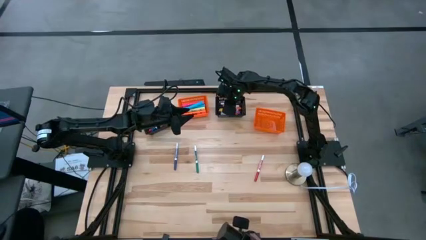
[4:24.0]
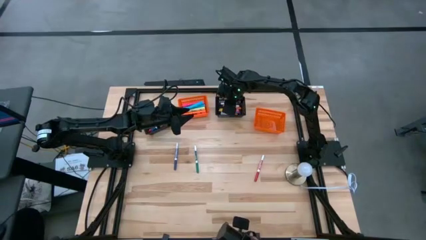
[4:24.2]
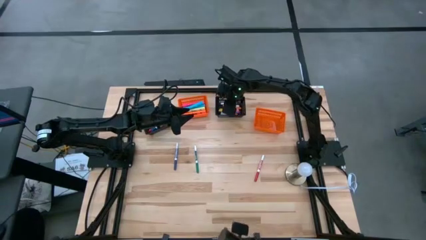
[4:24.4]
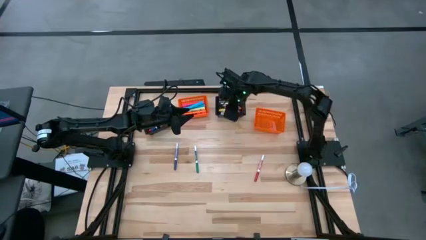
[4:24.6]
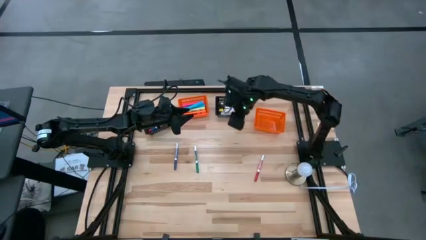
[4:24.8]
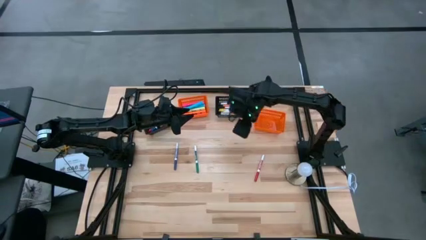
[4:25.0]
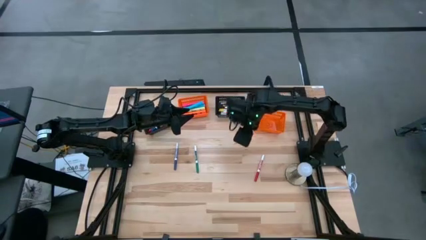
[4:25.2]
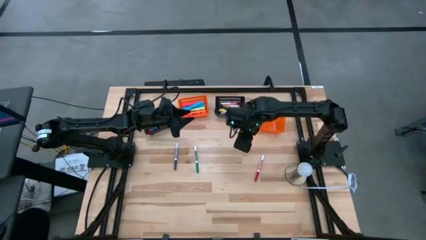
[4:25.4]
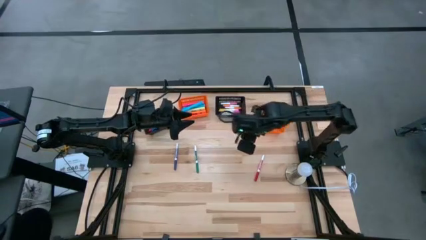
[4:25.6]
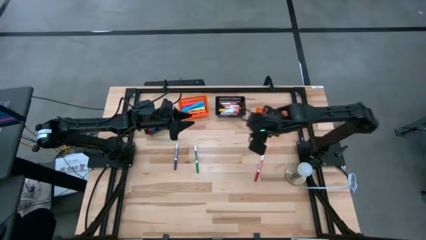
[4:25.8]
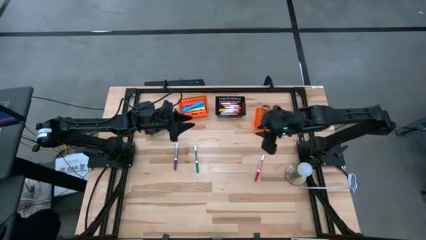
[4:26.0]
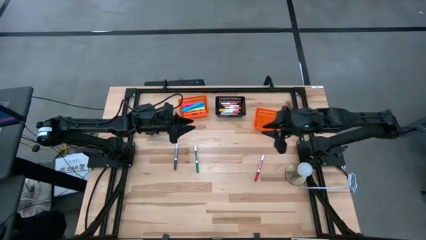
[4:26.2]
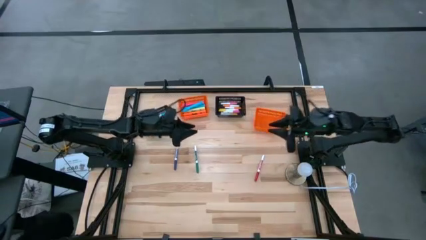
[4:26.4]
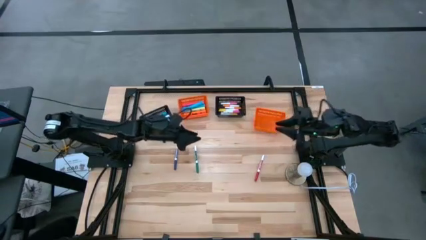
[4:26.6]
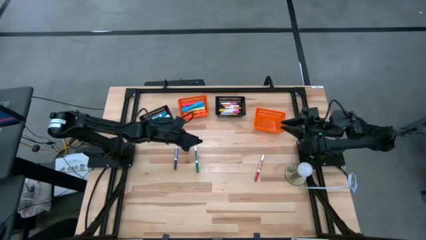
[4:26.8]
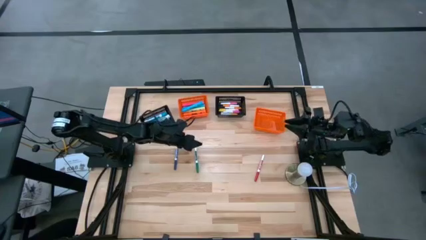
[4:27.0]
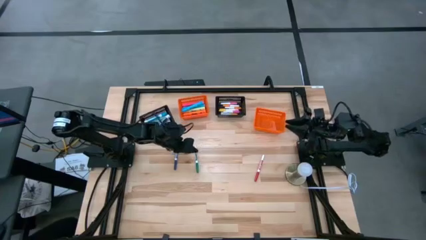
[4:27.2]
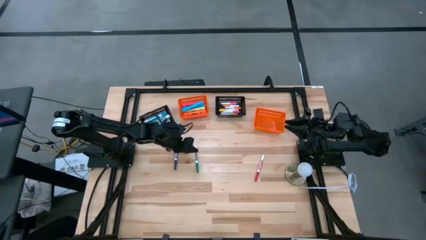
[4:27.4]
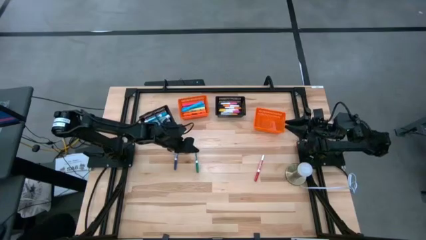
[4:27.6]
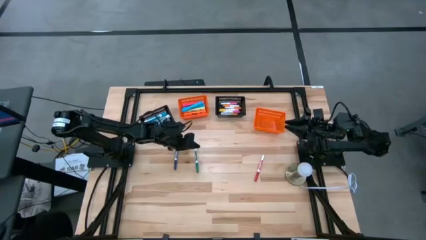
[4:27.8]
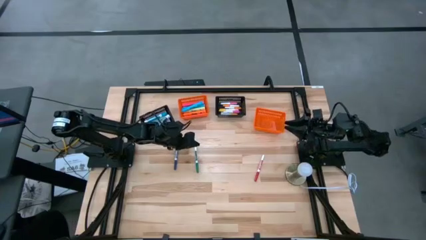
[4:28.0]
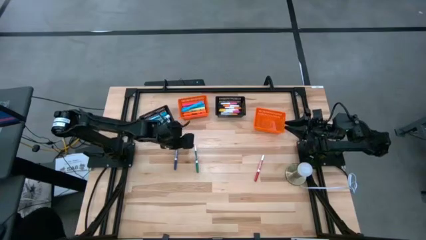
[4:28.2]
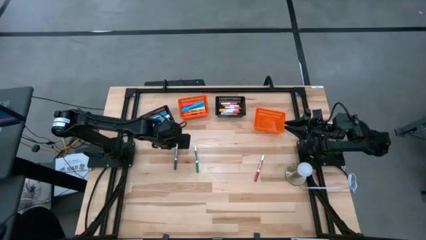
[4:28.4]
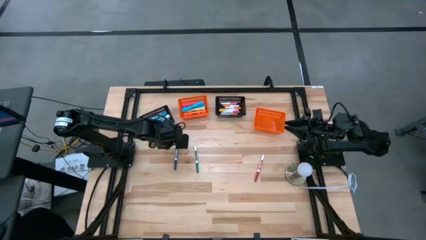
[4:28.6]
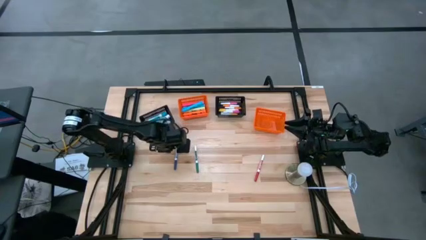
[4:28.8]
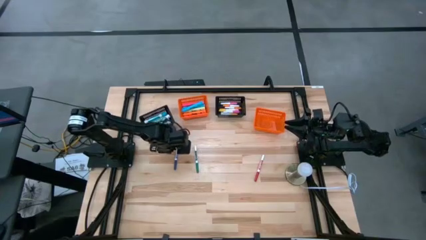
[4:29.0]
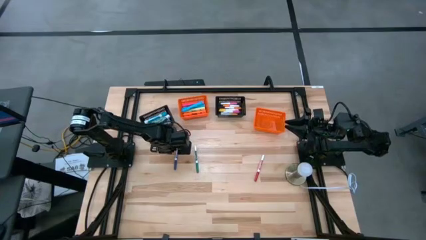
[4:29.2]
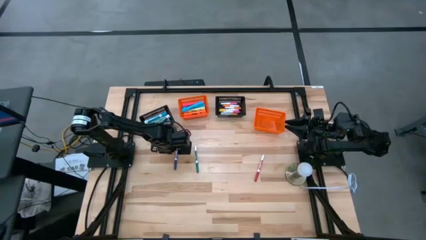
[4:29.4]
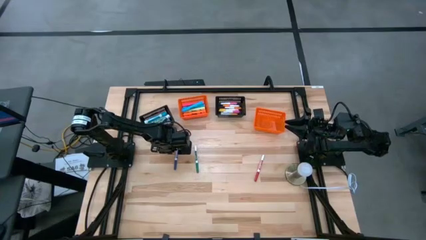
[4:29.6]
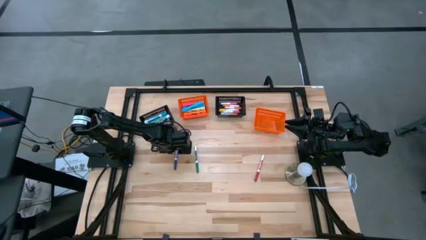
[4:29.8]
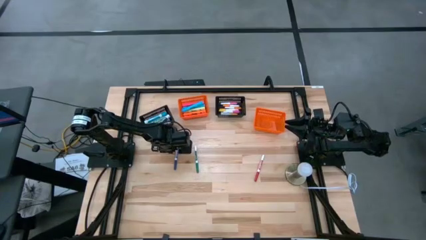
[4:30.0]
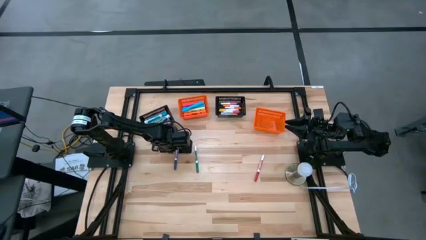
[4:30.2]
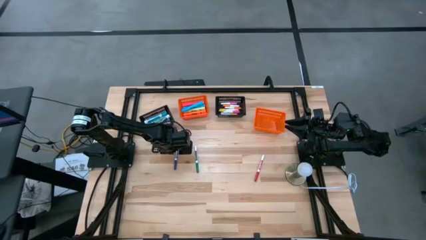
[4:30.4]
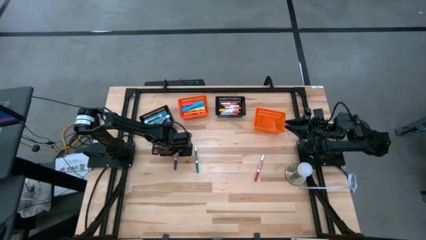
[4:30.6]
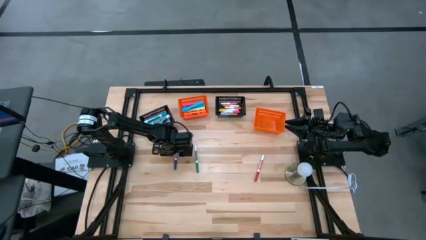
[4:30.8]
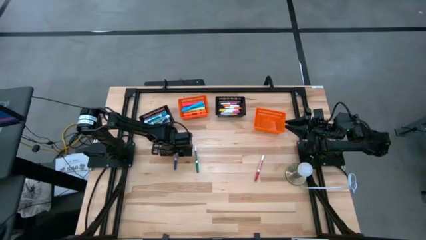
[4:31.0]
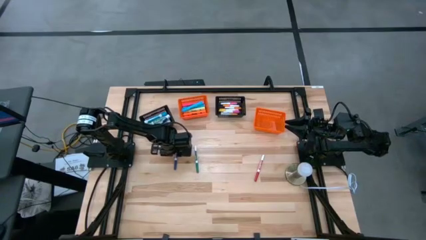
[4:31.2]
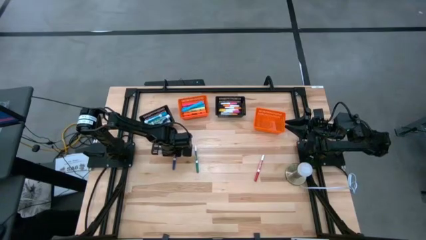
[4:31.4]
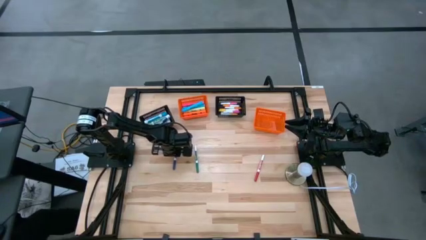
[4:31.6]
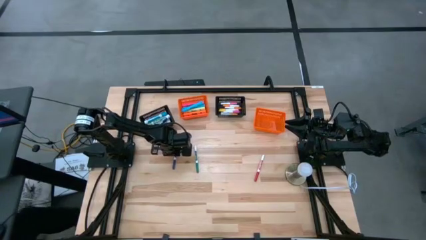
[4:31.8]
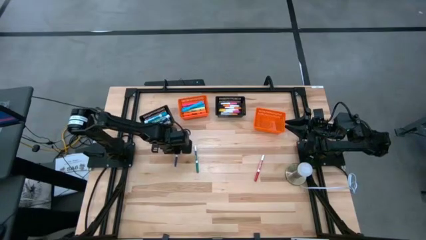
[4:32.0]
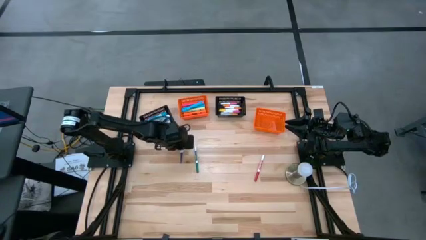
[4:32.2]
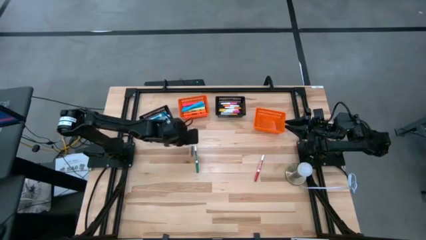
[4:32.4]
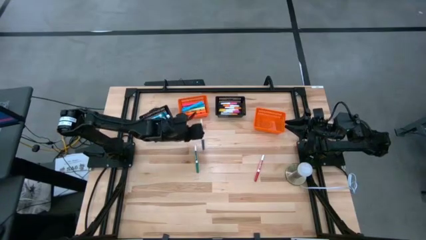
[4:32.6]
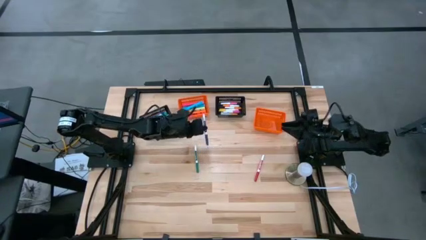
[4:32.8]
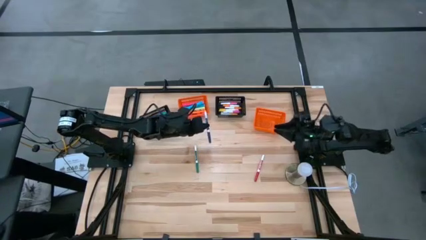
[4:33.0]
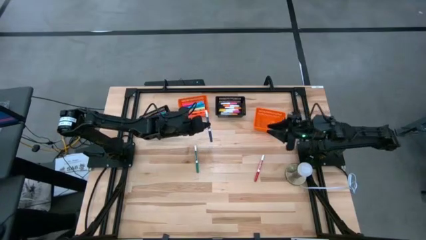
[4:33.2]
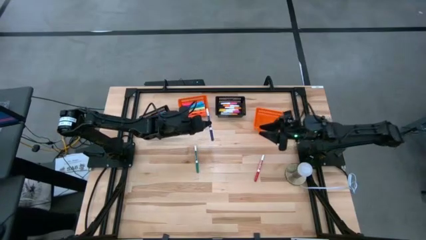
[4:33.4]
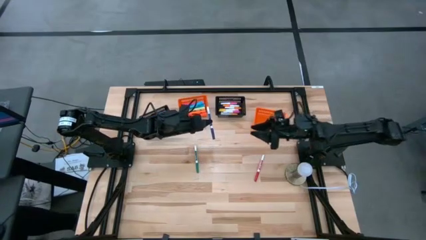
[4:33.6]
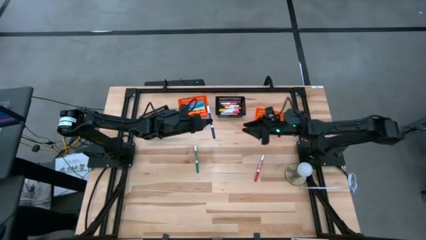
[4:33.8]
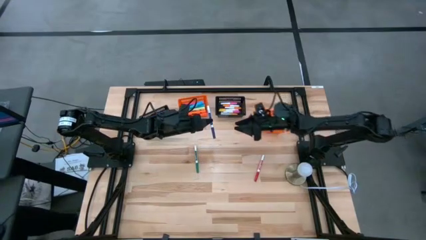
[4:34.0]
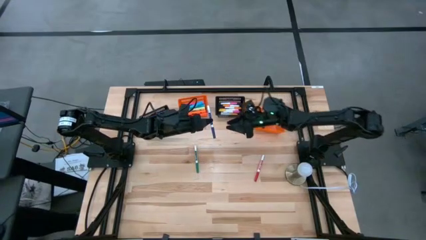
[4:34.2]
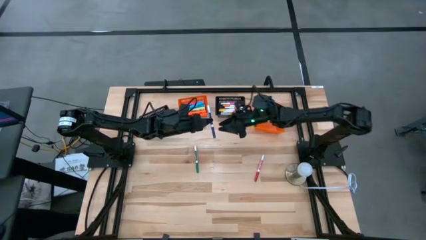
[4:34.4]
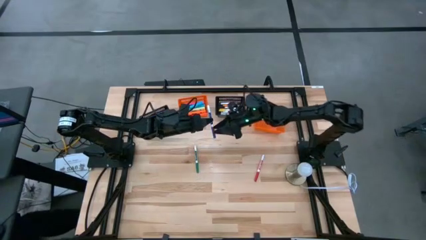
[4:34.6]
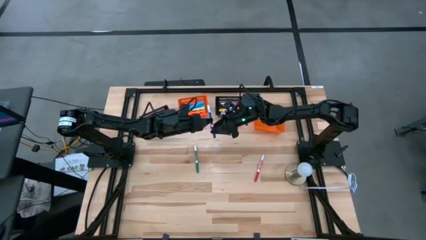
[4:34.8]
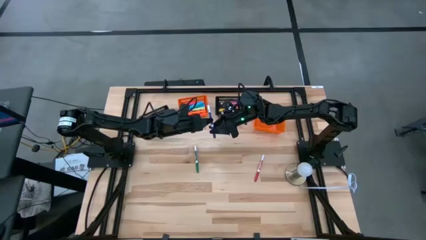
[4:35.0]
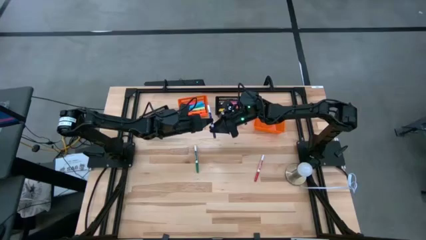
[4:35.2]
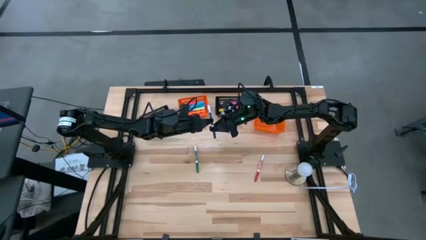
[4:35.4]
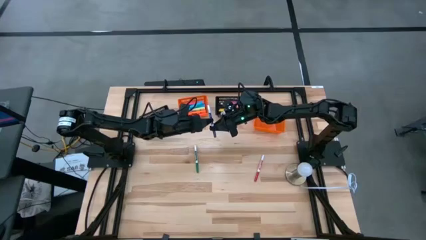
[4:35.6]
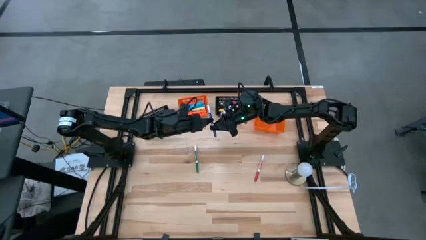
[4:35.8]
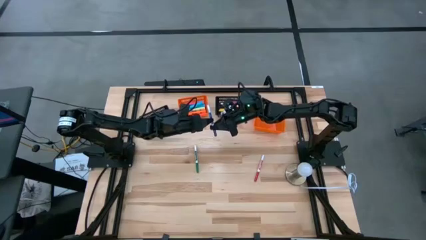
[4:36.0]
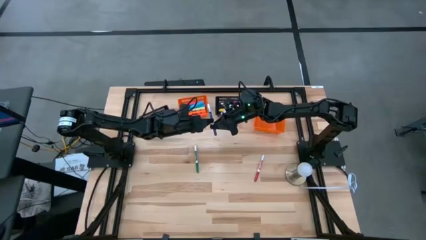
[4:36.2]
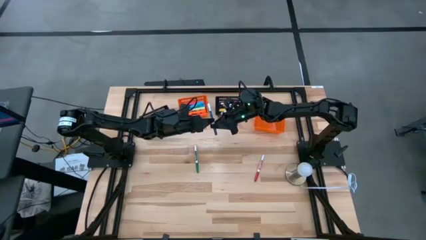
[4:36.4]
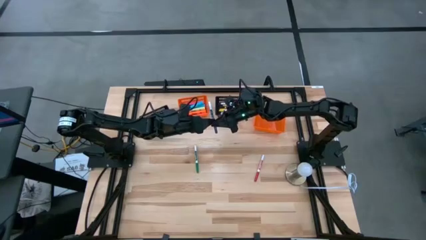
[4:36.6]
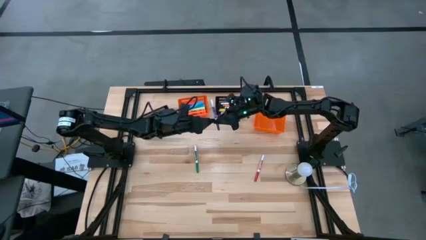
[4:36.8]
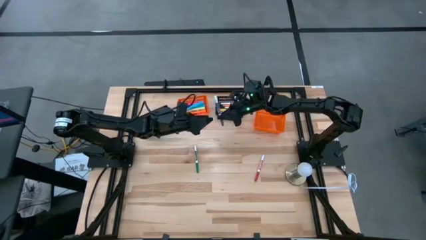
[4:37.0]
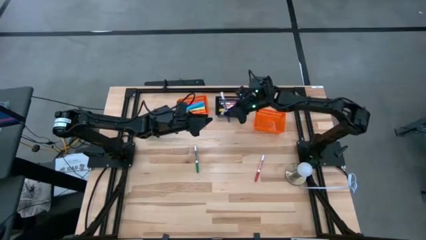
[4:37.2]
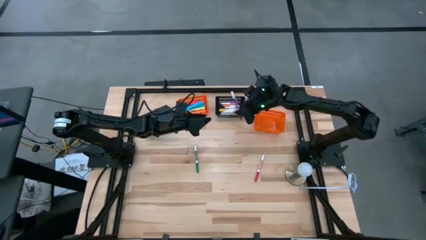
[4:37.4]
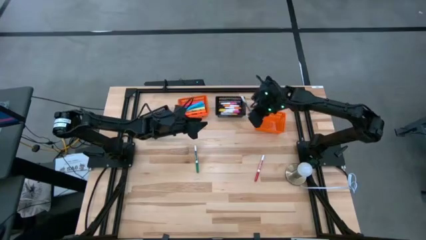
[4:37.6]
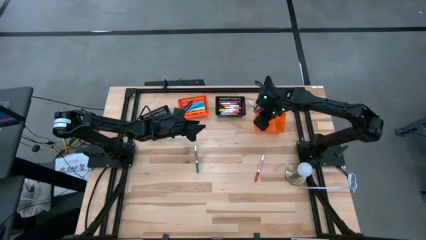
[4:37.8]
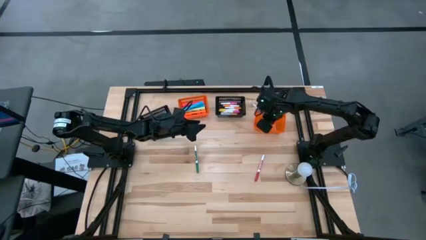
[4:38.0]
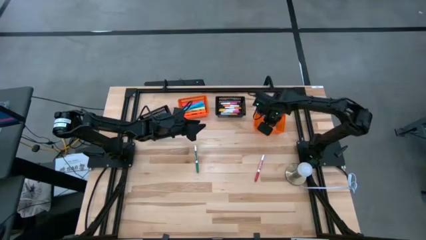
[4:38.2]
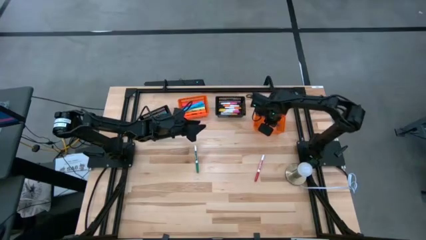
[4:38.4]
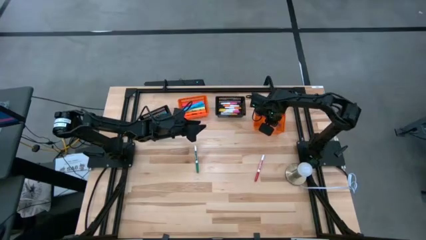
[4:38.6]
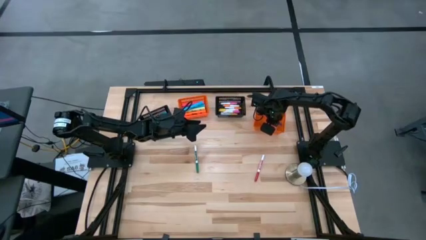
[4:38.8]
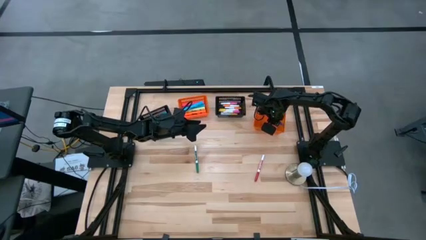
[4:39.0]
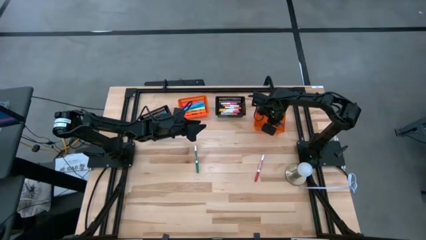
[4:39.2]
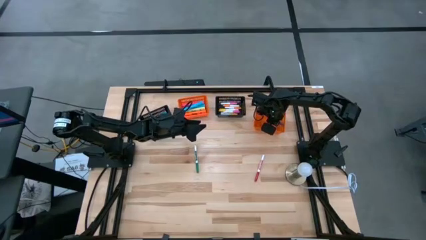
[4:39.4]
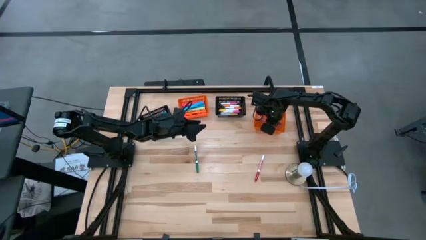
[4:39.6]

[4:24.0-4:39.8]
Task: Pick & Place Markers
Put the small dark blue marker pen into the right orange bin
